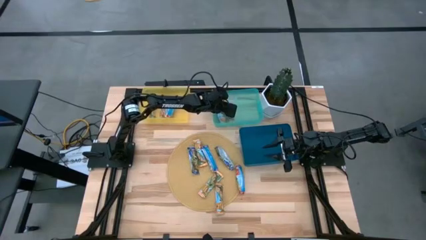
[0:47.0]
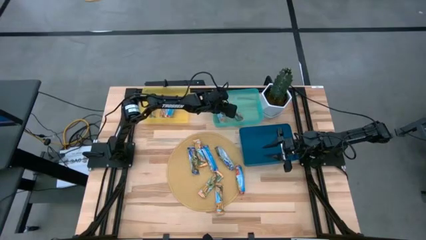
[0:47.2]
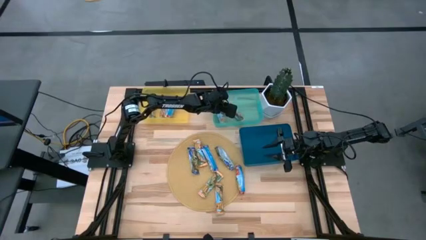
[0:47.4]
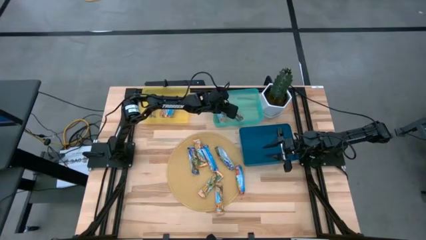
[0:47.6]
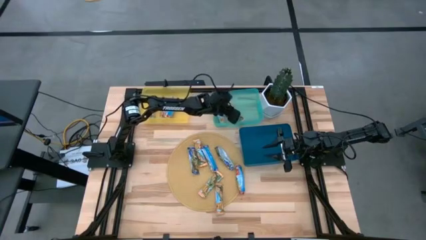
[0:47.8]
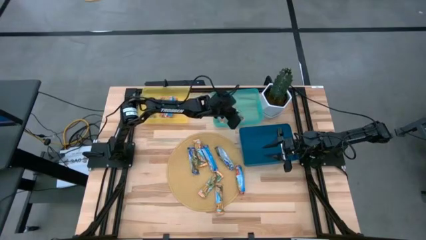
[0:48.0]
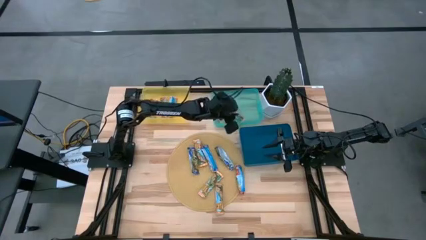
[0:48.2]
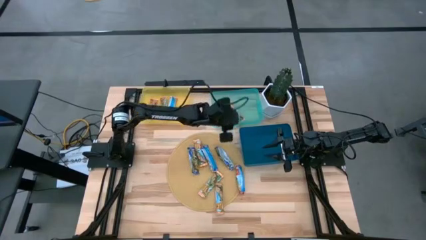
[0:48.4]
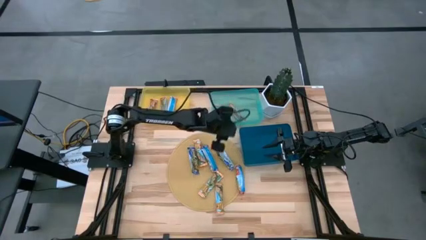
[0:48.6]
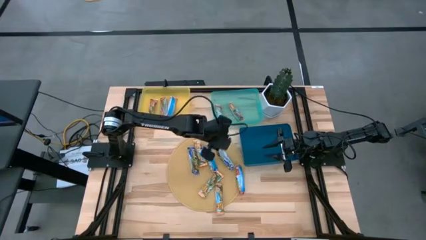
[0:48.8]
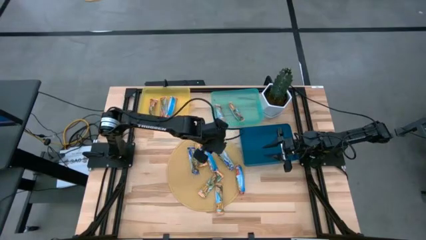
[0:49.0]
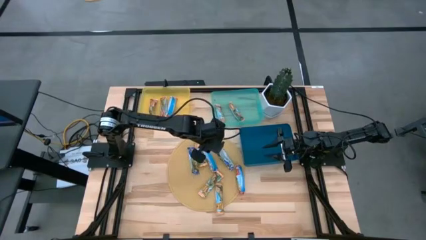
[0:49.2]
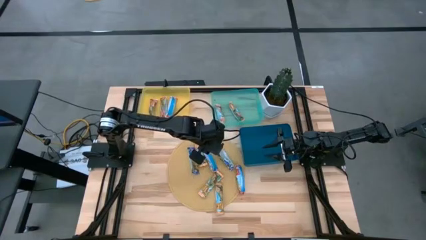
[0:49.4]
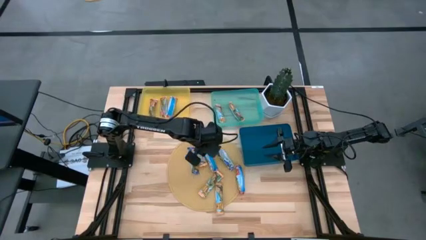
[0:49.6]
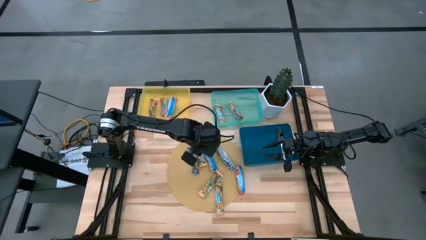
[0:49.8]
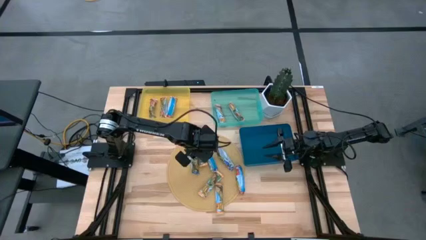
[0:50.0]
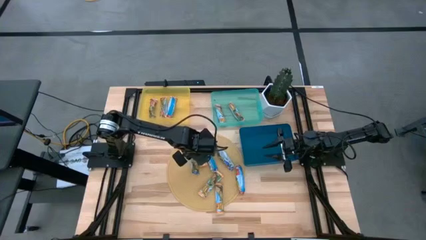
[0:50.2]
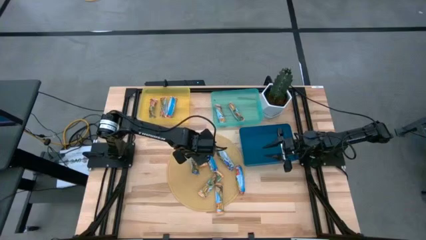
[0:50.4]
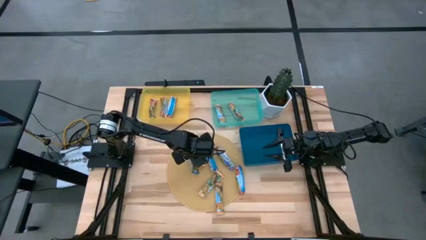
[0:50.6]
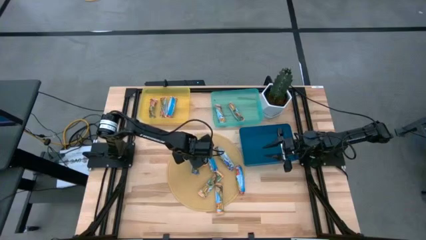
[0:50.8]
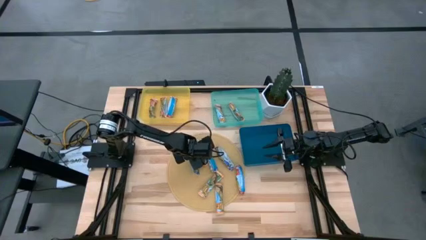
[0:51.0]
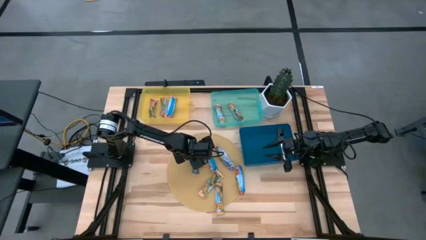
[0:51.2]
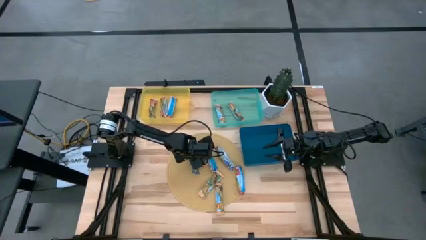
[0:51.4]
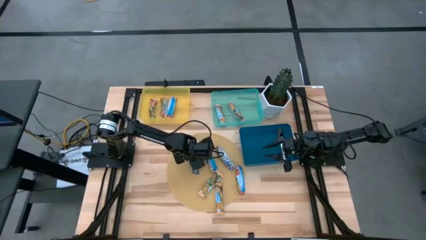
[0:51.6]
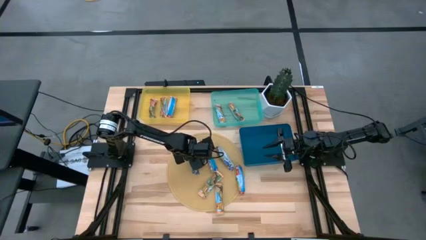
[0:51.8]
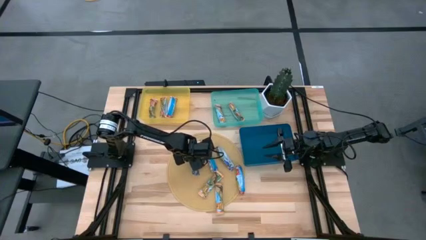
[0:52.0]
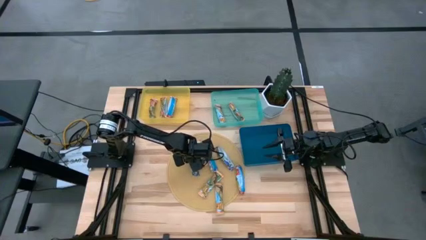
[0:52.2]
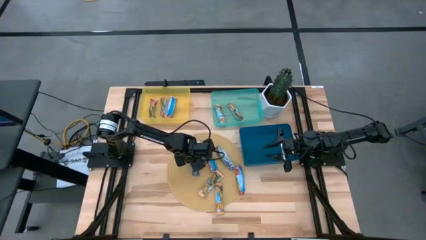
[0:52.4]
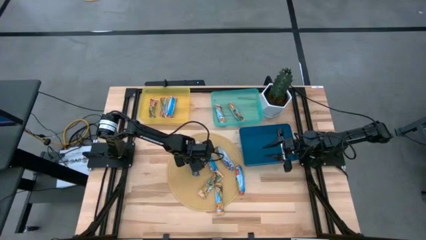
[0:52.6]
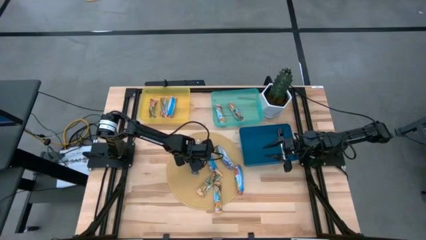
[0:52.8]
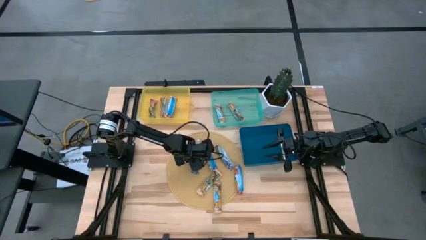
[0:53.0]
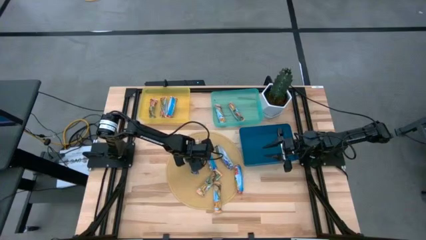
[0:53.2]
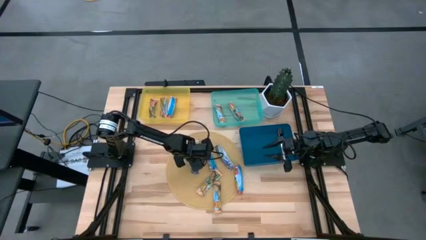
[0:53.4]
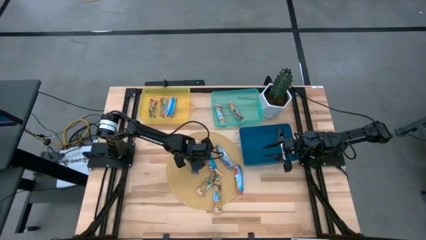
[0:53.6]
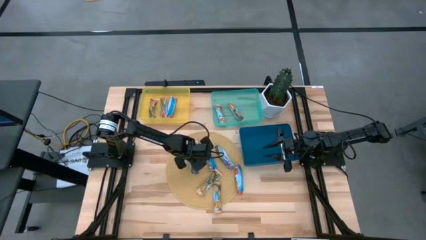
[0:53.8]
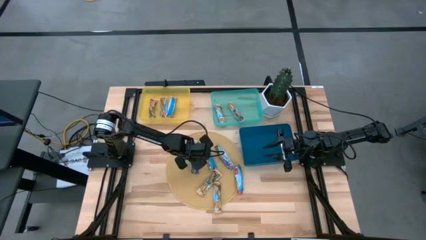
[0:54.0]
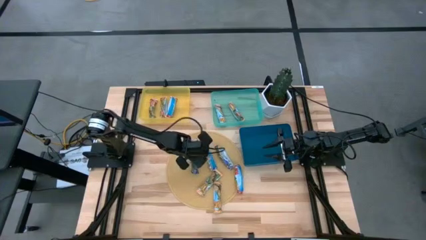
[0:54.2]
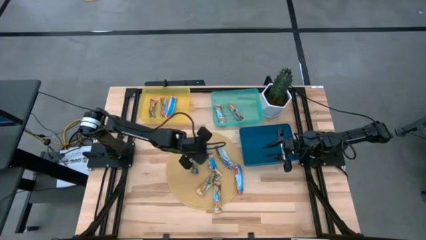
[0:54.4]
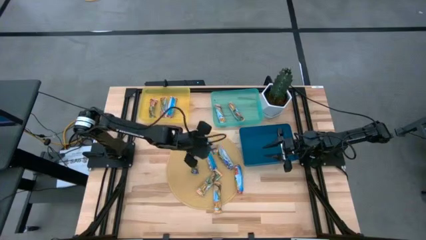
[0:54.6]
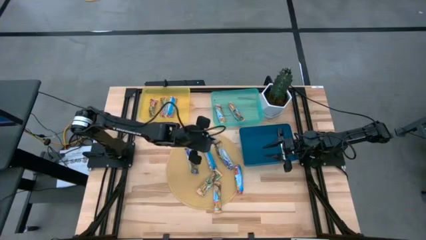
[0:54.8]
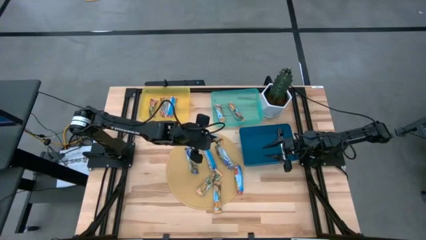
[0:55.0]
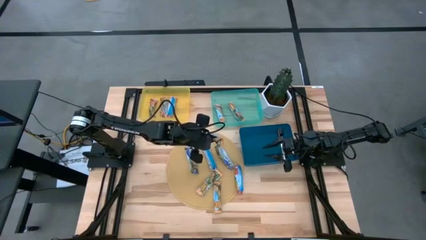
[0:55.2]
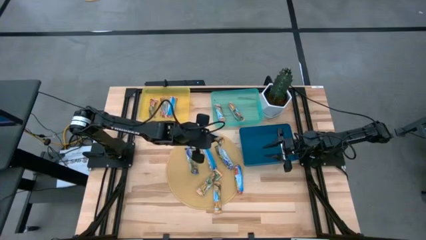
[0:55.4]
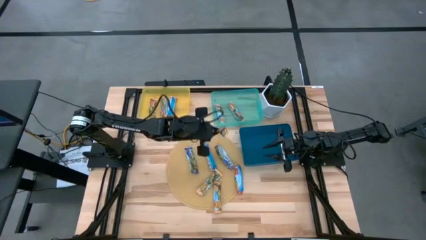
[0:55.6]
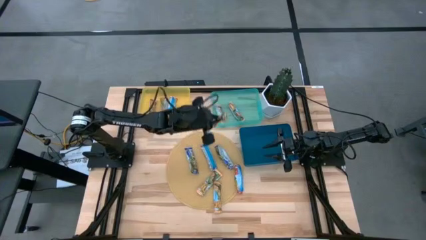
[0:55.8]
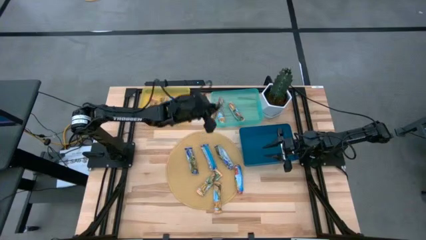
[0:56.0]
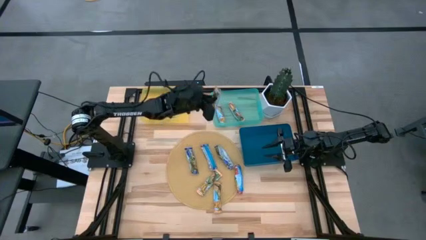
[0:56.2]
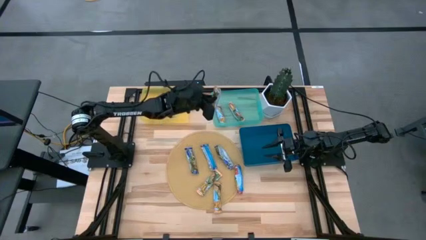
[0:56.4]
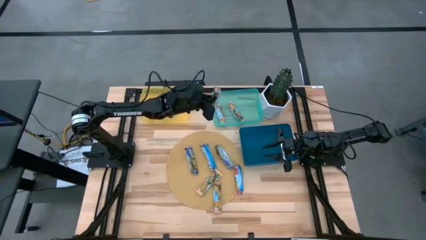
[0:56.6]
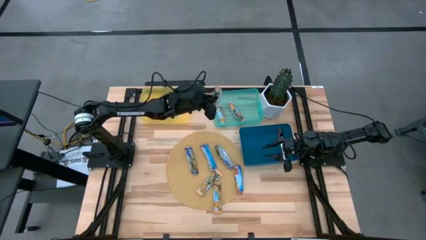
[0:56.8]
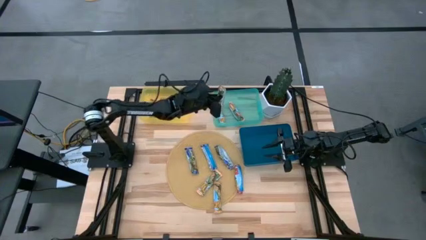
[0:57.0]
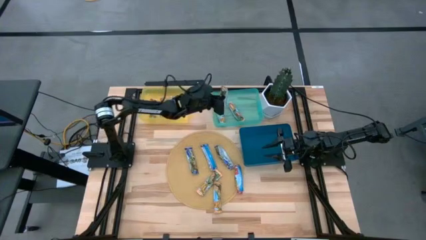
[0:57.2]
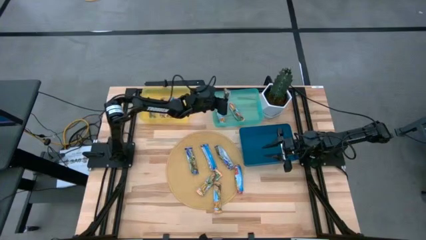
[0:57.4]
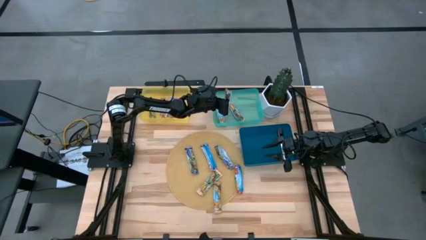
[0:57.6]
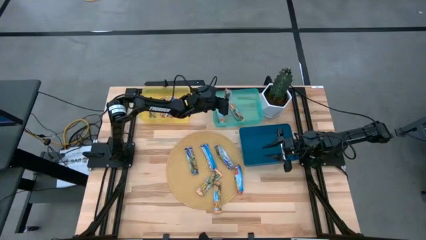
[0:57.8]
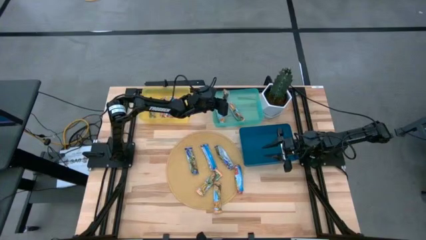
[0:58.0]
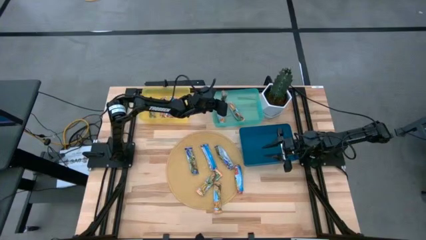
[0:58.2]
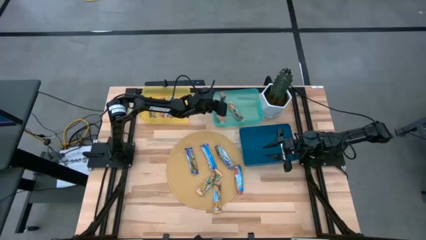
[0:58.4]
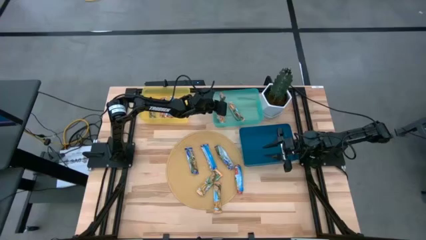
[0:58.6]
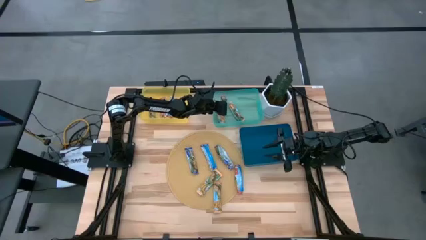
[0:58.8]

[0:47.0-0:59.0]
Task: Pick and place Granola Bars by type
Put the orange granola bar into the green bin

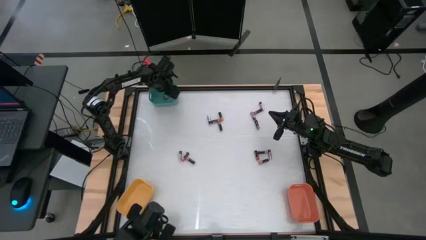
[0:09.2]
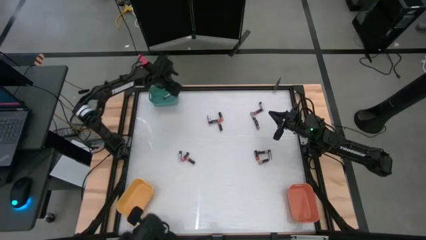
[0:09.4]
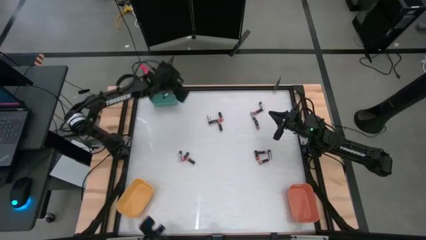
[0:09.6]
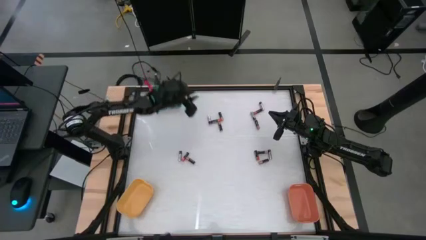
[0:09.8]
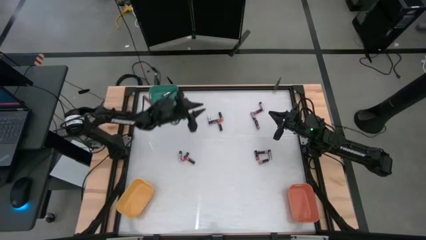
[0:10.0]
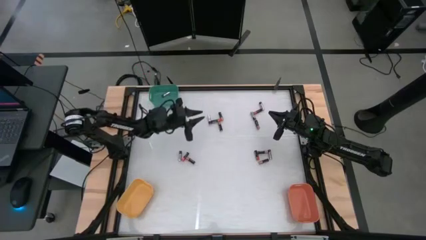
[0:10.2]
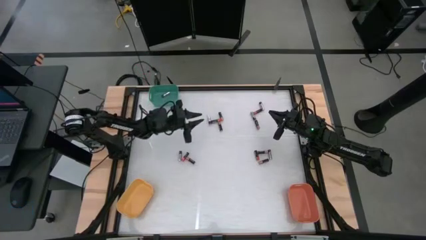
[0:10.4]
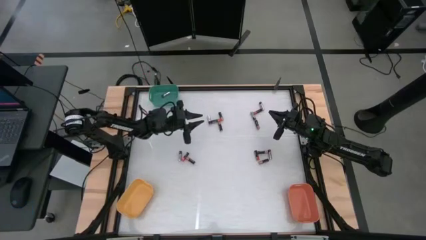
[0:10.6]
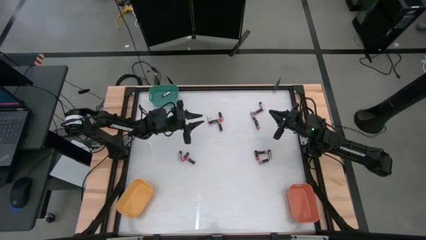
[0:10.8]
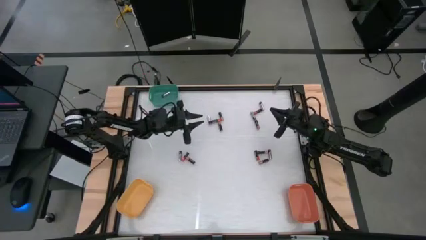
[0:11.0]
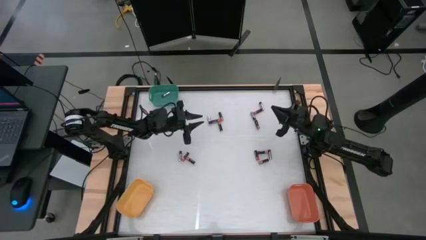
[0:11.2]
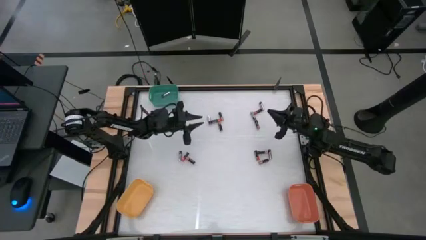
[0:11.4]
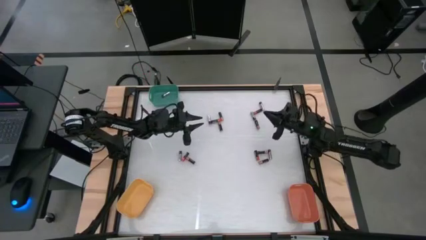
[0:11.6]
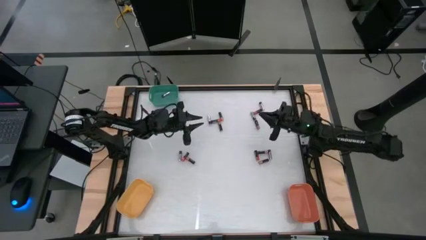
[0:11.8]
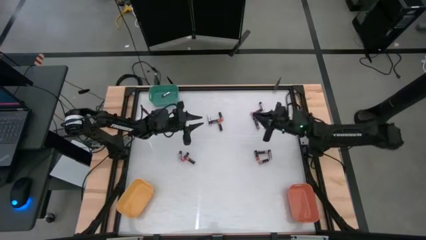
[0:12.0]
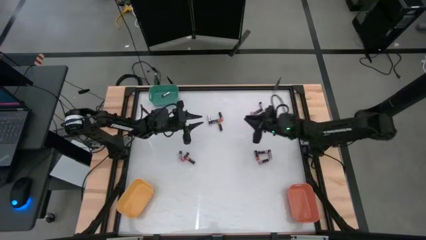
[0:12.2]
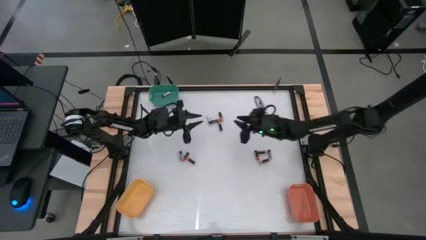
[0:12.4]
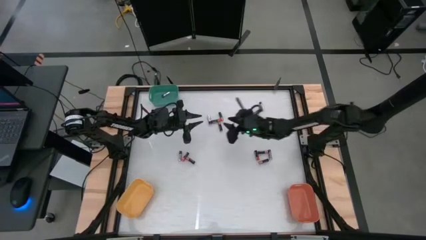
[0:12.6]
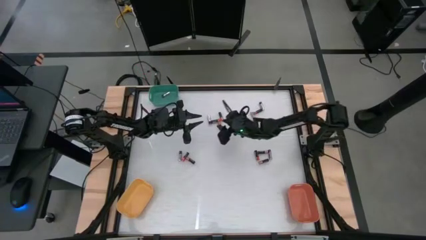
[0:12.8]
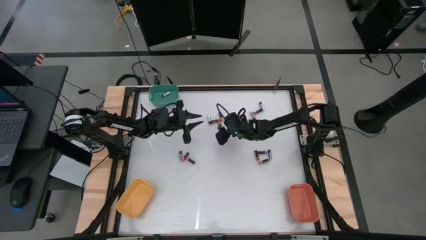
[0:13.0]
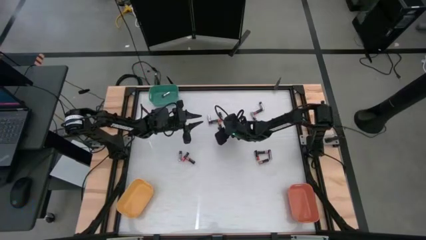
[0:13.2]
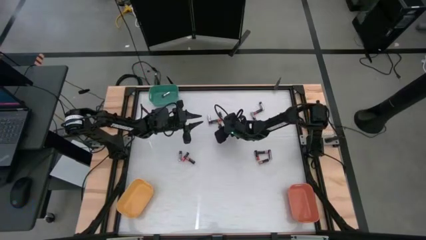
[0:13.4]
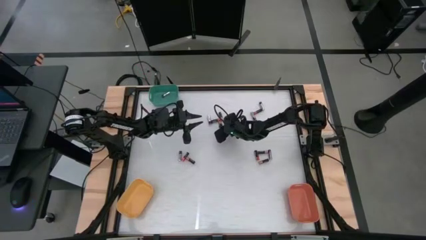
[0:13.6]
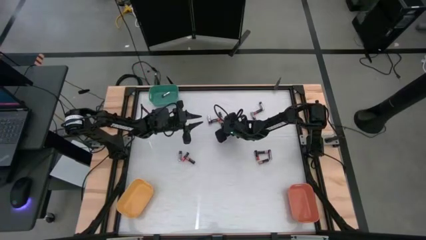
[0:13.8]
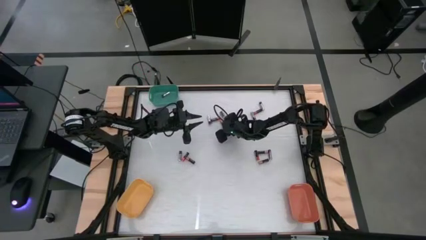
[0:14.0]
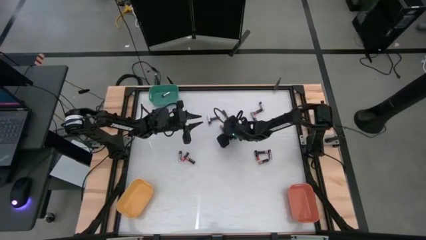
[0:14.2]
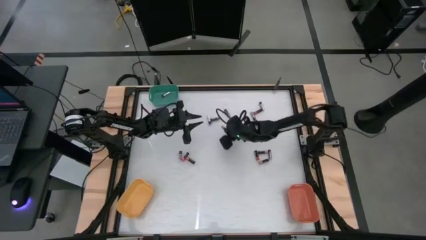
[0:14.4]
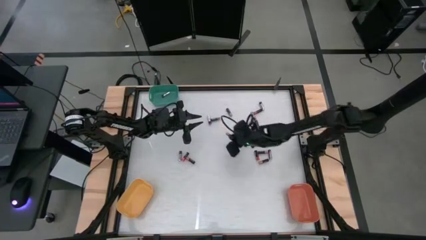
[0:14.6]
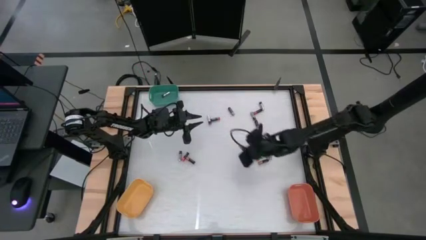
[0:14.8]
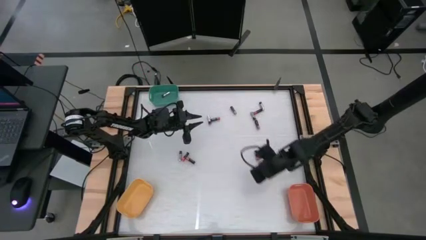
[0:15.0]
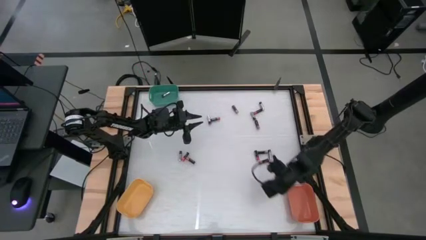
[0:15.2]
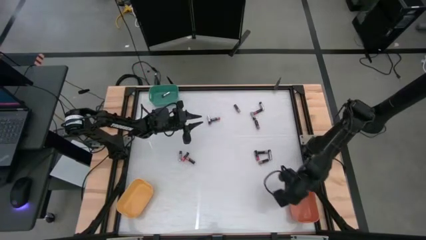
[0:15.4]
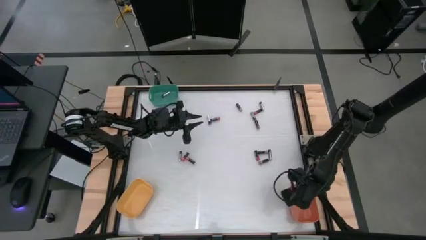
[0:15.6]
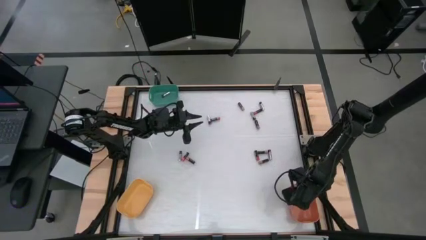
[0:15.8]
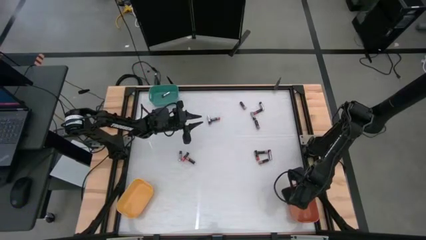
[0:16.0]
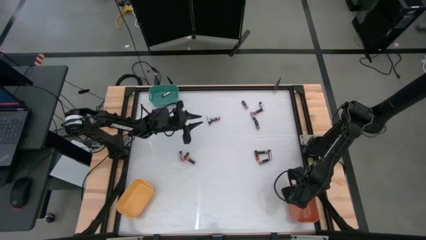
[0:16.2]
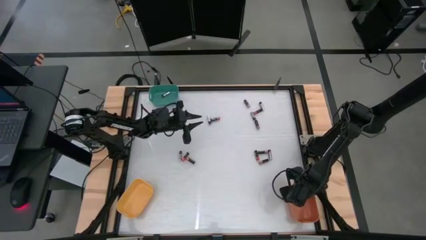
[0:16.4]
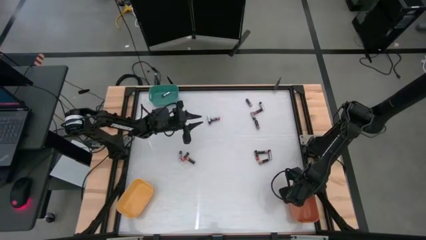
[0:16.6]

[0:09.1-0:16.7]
Task: Sort batteries
Put the top center gold battery in front of the red battery into the orange bin
